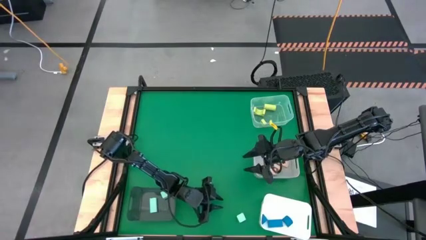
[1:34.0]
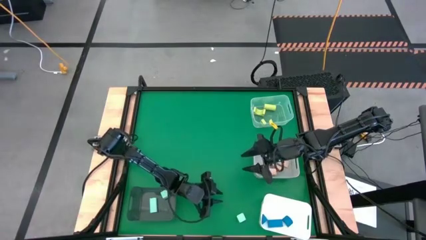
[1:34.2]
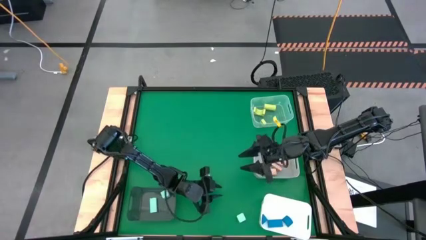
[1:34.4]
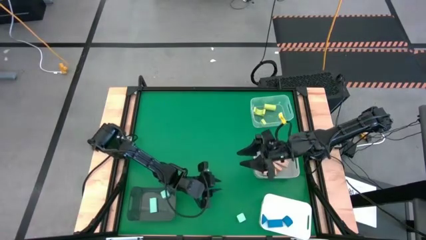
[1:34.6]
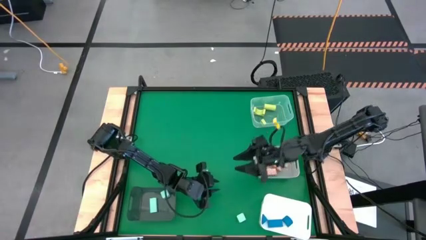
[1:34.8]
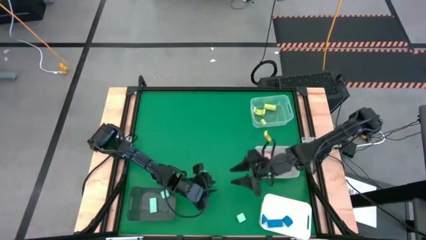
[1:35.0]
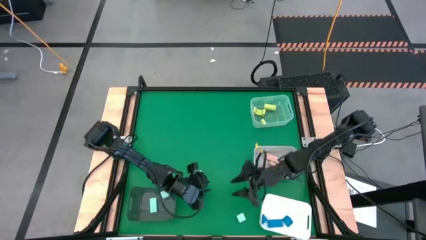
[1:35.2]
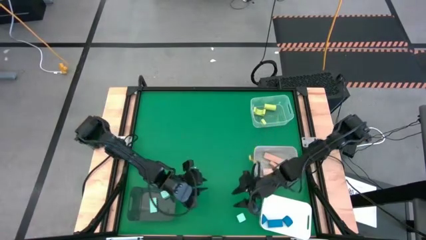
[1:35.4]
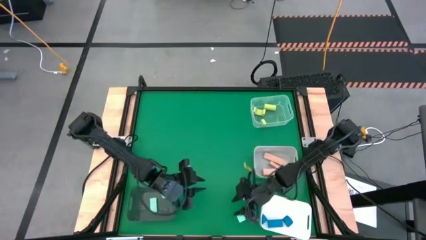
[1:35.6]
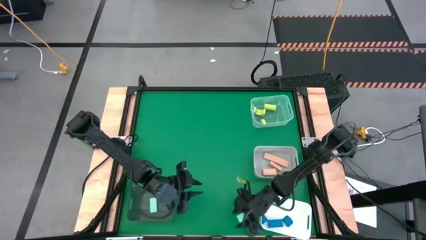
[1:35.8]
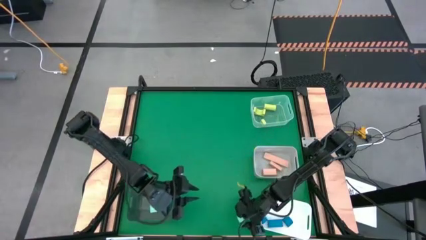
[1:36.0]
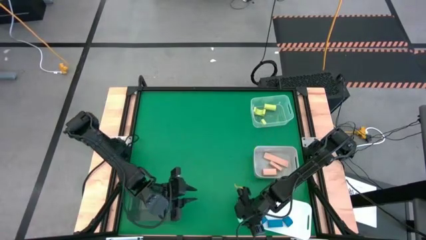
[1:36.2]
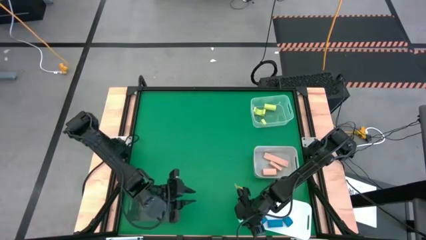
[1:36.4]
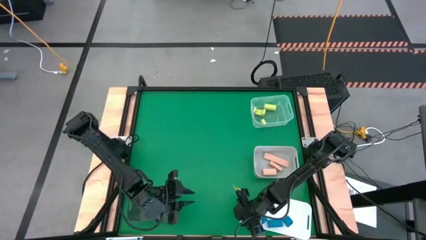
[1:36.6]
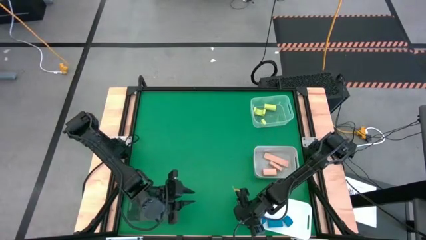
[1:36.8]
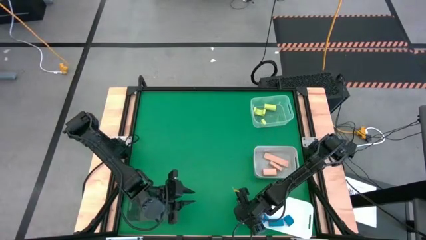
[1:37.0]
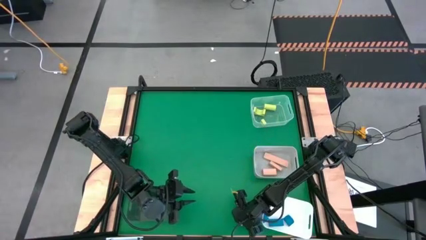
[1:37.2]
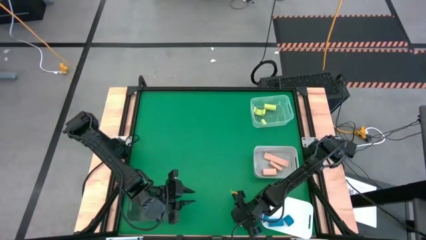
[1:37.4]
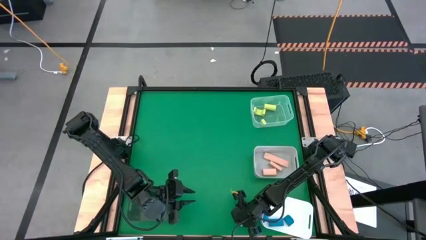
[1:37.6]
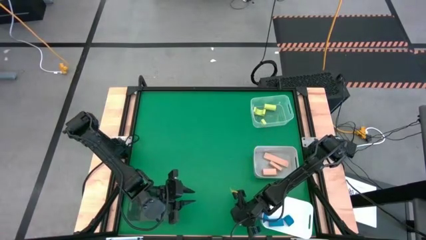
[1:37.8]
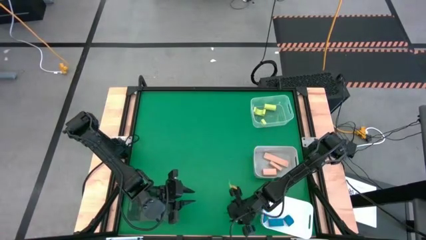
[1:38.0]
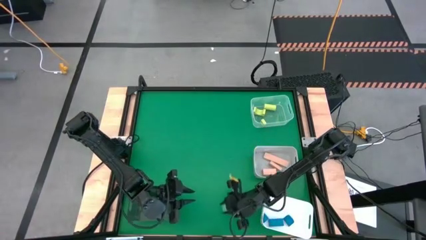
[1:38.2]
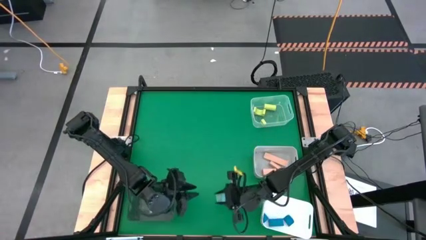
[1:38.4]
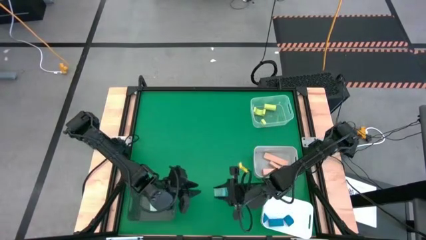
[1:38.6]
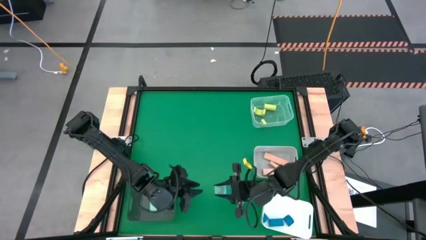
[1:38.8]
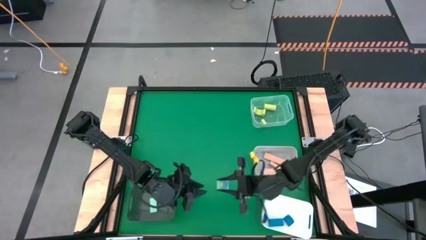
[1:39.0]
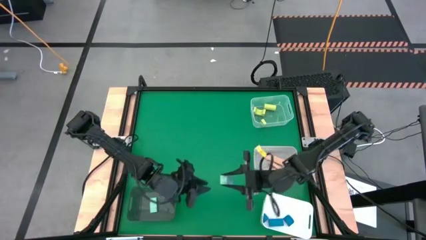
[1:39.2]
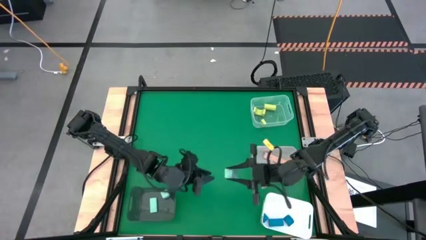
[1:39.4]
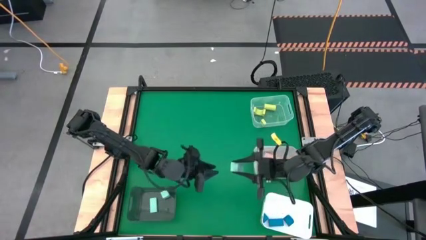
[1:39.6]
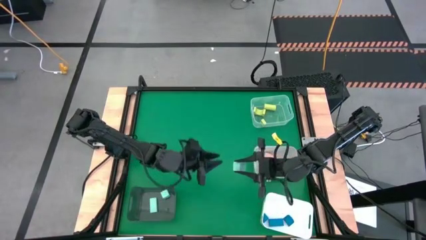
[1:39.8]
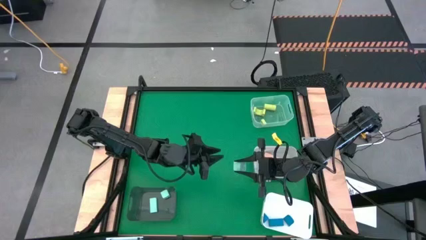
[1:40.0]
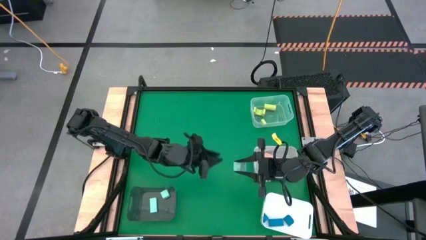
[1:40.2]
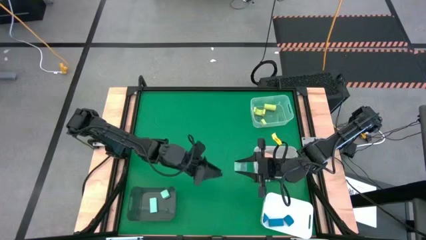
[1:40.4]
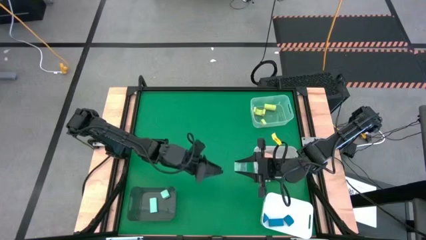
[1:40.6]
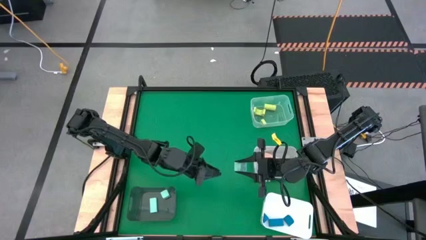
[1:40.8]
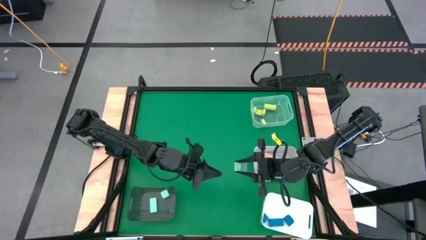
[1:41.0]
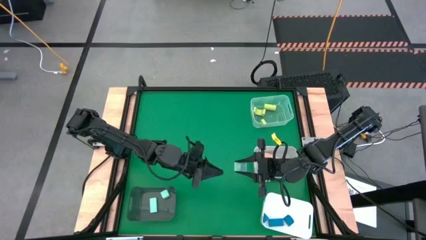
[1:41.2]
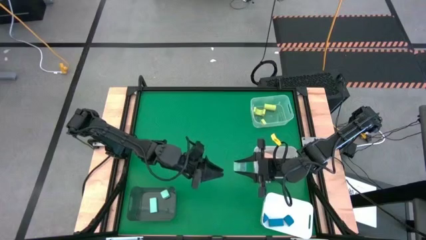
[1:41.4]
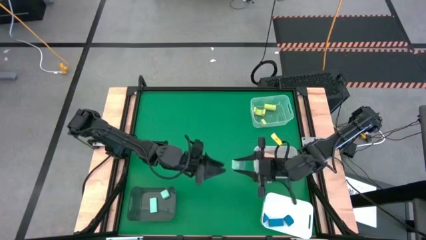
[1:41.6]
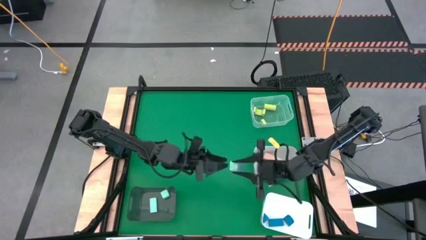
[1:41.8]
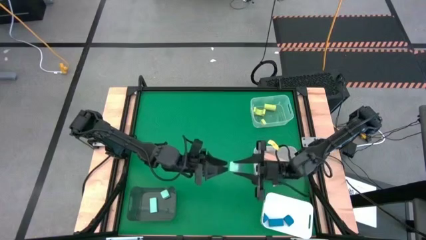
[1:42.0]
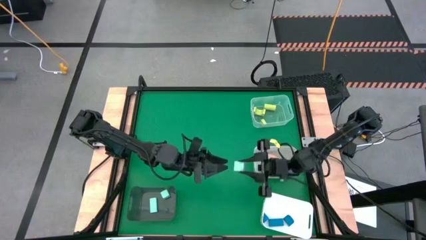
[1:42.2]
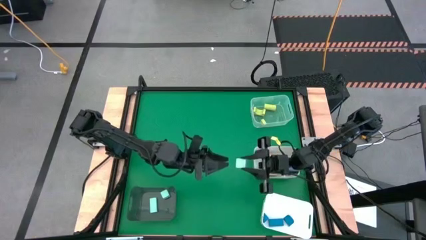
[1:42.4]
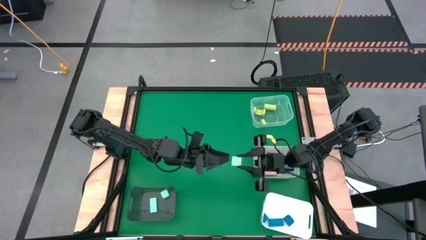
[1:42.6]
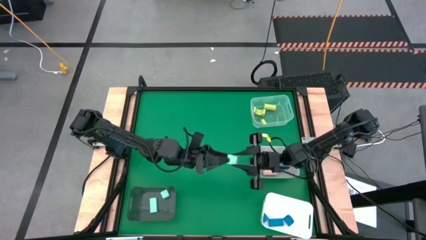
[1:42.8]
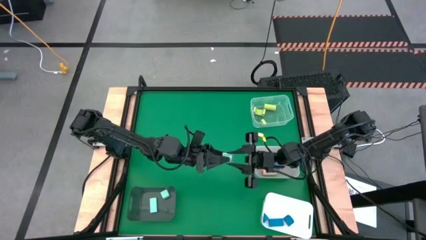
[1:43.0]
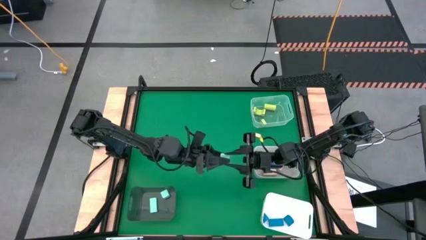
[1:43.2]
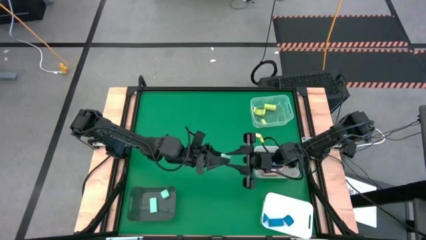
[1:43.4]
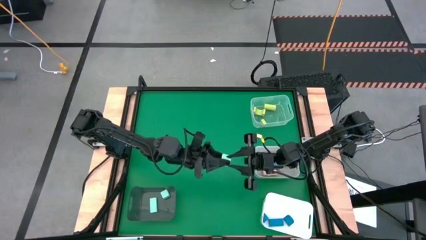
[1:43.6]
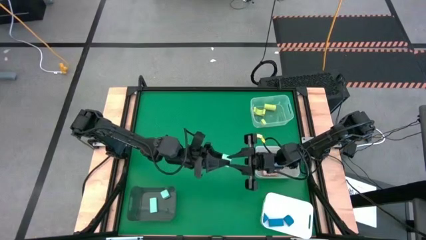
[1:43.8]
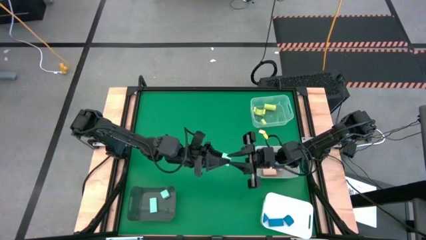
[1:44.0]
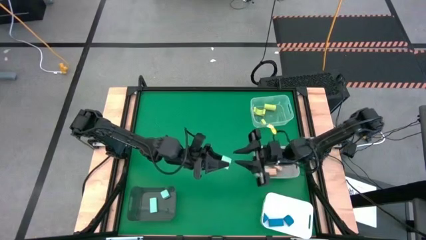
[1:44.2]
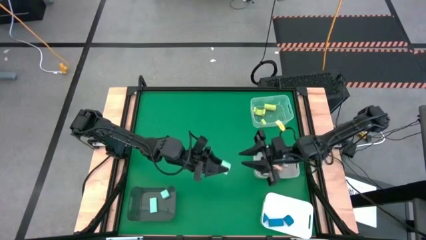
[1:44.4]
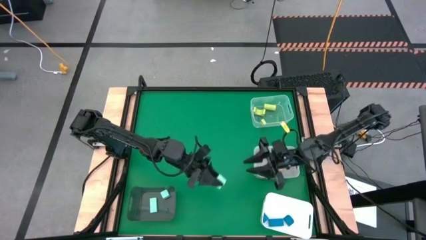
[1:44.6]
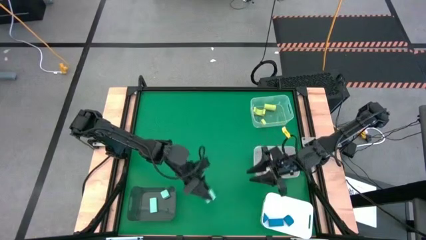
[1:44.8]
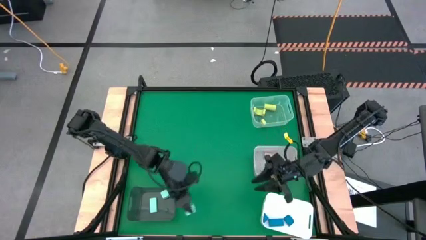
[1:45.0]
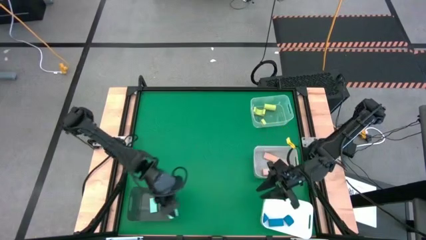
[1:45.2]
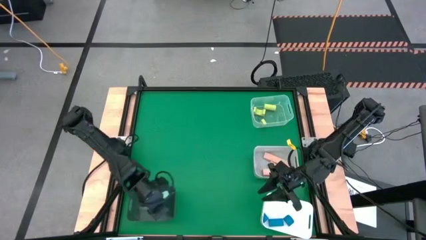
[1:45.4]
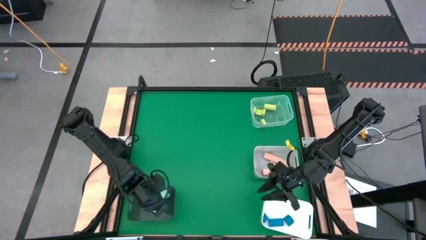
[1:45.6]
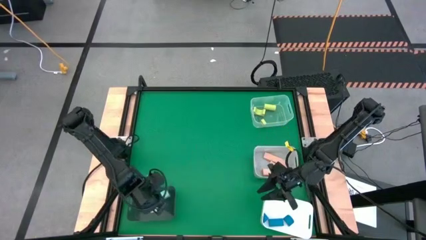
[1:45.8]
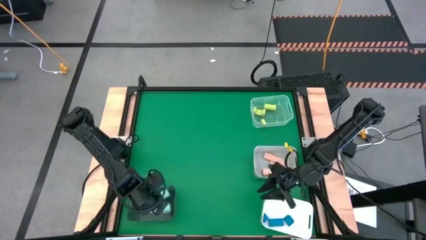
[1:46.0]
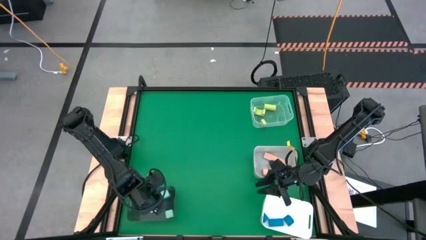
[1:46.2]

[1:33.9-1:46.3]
Task: Sort & place blocks by color
Put the light blue block into the black bin

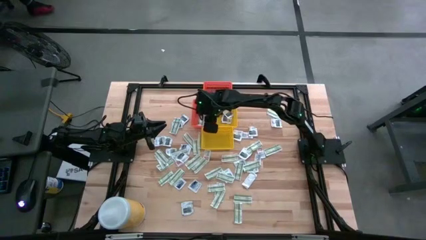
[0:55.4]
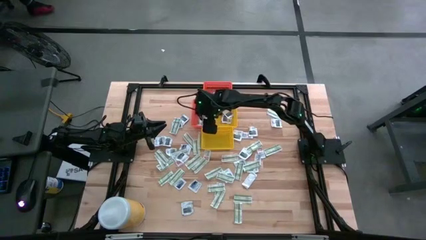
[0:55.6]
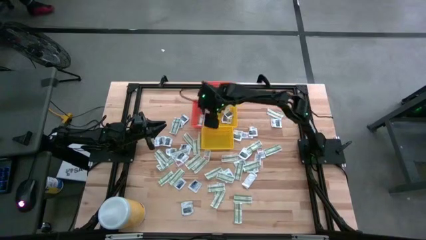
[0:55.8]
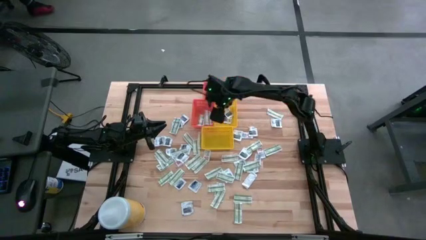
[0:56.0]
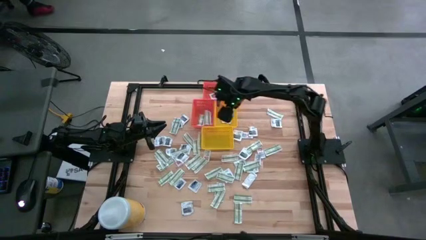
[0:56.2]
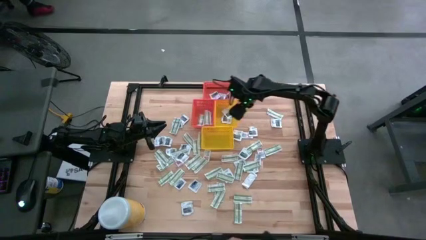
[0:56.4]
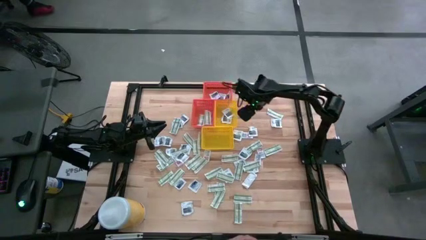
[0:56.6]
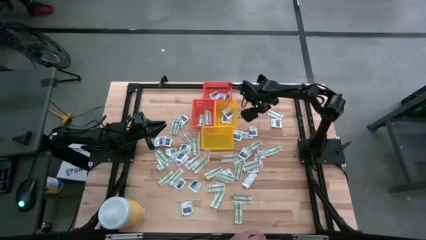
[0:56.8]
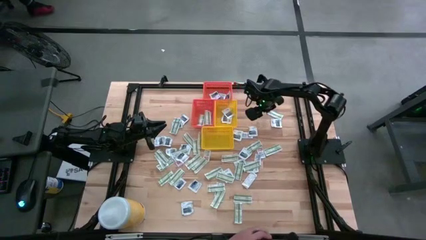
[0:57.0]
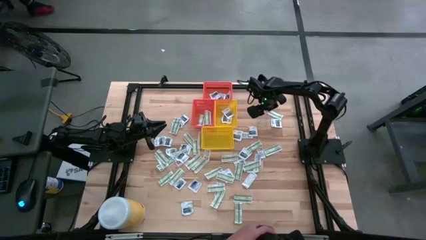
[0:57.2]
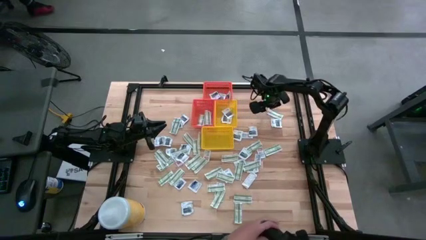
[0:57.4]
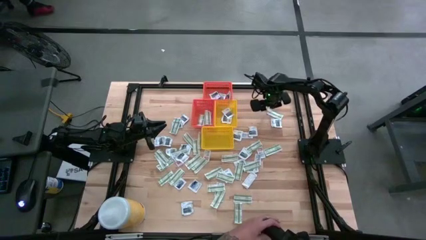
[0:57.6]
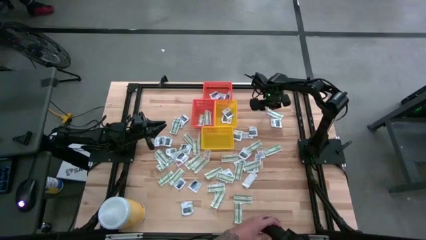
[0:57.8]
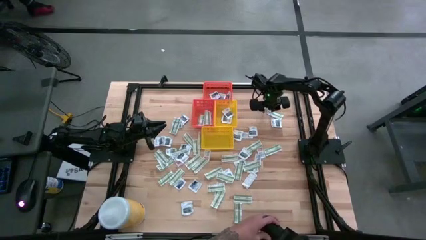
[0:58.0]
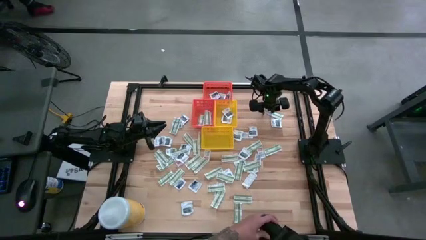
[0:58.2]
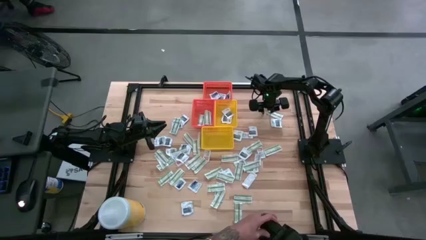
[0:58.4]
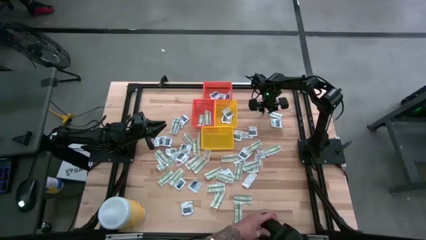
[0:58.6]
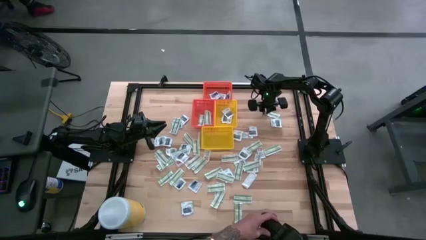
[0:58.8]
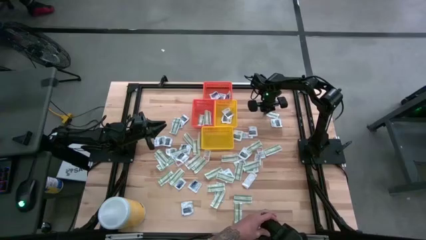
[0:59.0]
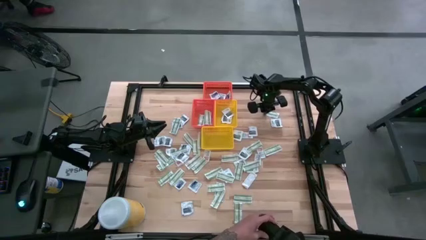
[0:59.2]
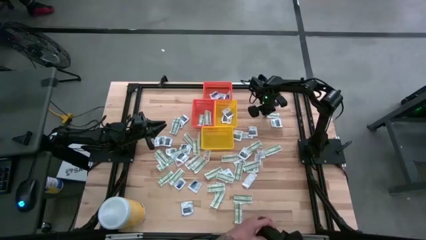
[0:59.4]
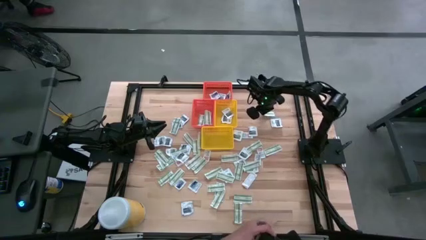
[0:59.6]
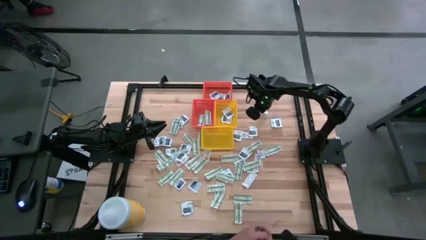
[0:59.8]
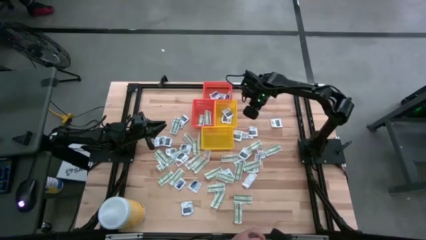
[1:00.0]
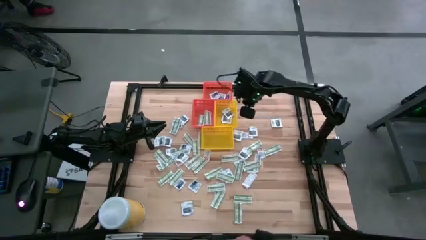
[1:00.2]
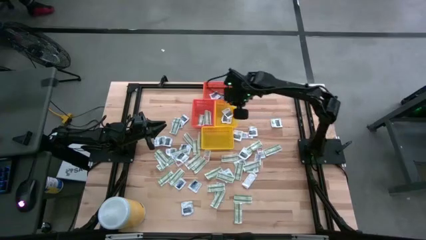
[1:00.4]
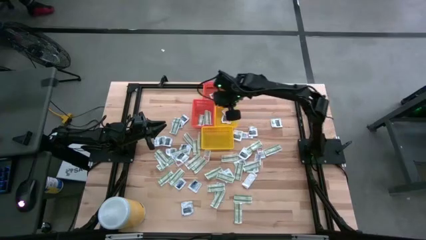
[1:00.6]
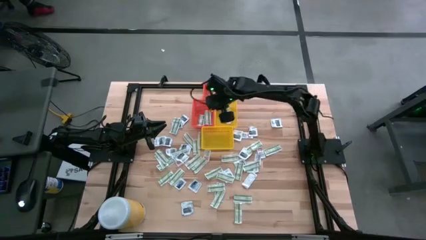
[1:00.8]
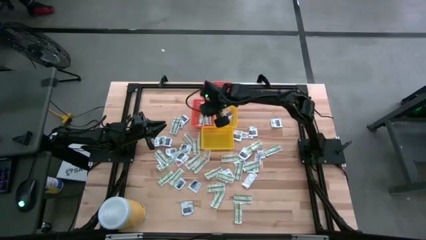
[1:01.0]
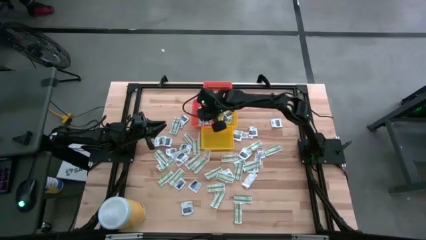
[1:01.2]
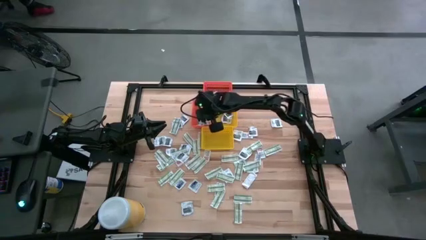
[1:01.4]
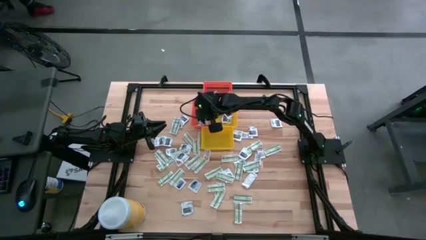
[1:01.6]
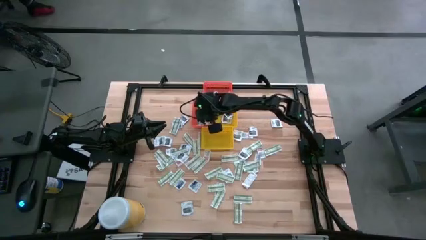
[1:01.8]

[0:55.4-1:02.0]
Task: Pick & Place First Aid Supplies
Put the bandage into the bottom orange bin
